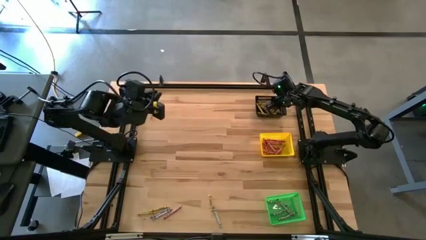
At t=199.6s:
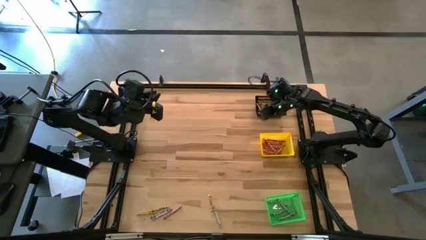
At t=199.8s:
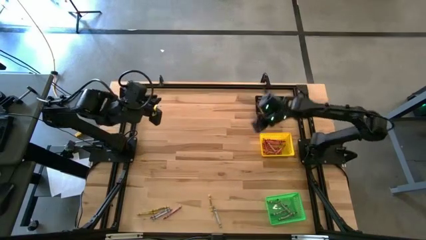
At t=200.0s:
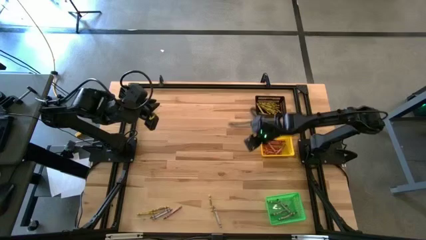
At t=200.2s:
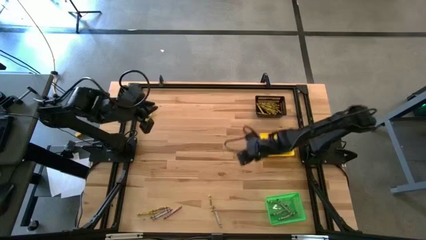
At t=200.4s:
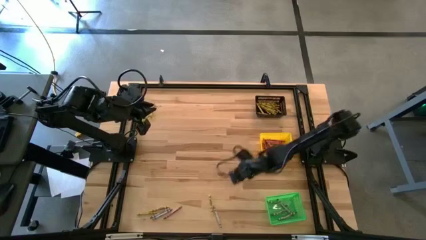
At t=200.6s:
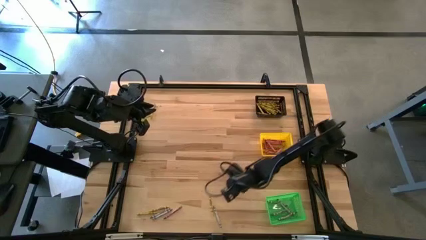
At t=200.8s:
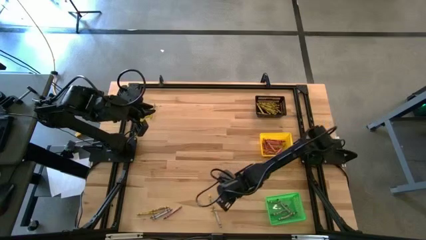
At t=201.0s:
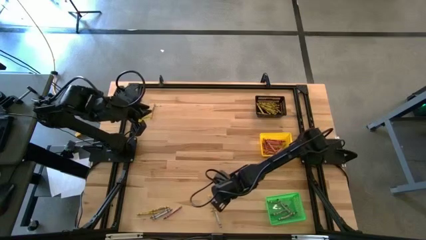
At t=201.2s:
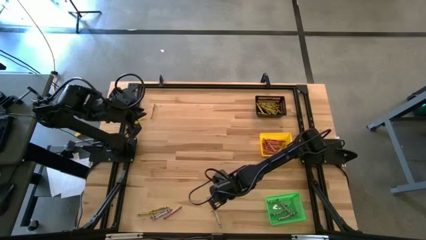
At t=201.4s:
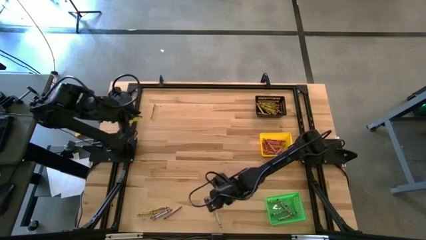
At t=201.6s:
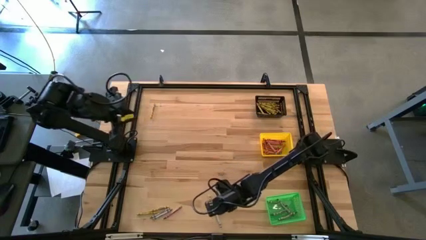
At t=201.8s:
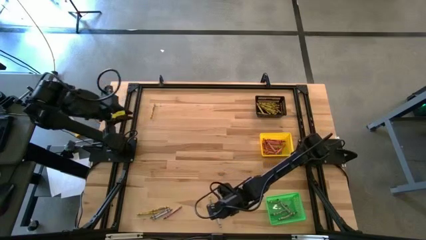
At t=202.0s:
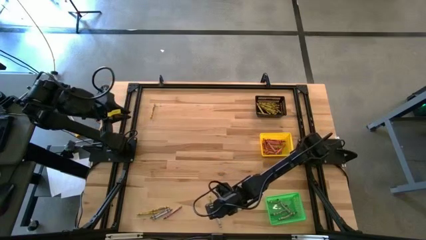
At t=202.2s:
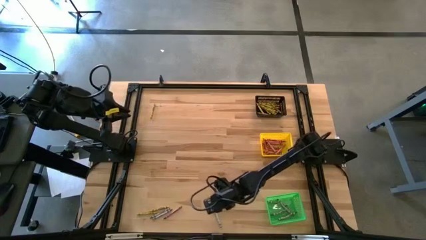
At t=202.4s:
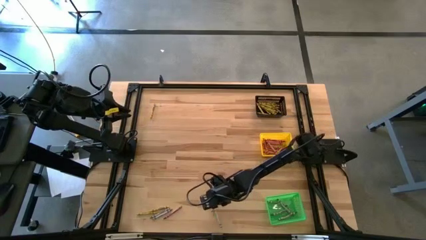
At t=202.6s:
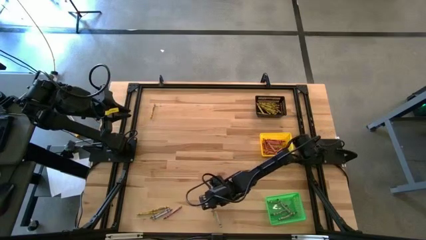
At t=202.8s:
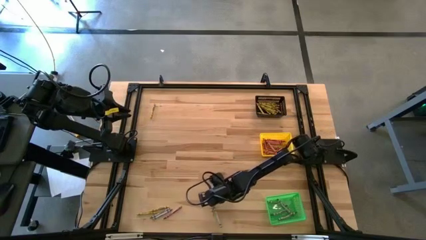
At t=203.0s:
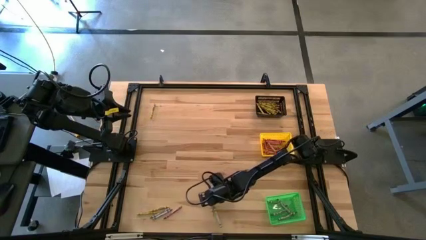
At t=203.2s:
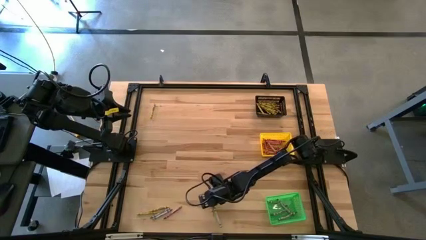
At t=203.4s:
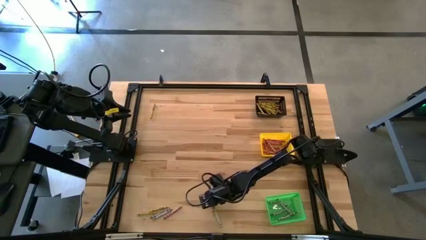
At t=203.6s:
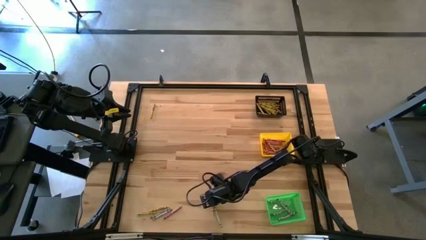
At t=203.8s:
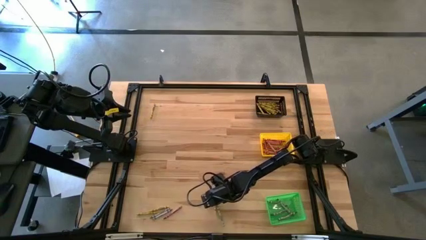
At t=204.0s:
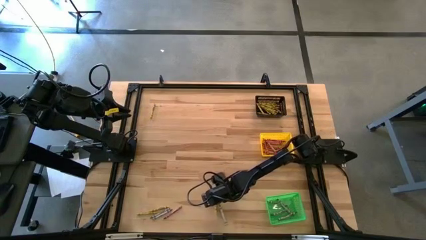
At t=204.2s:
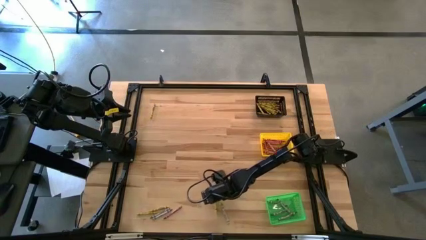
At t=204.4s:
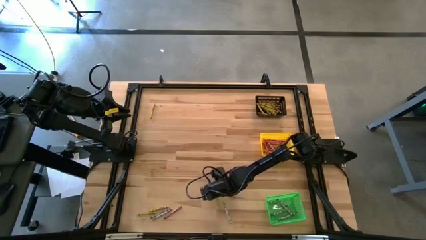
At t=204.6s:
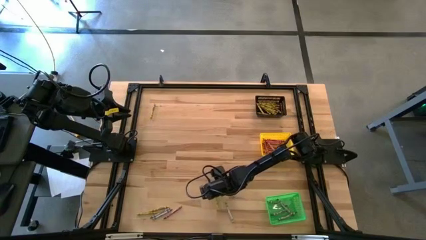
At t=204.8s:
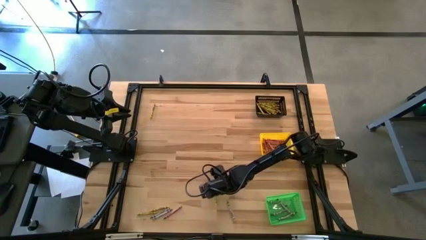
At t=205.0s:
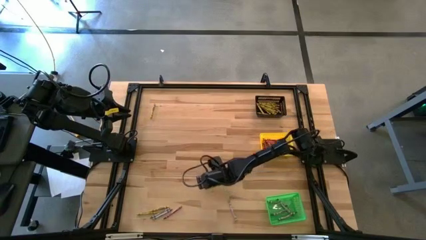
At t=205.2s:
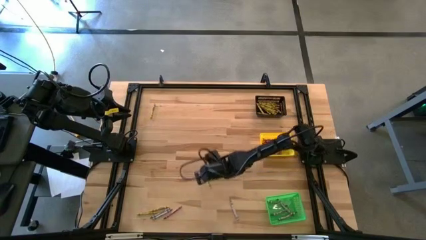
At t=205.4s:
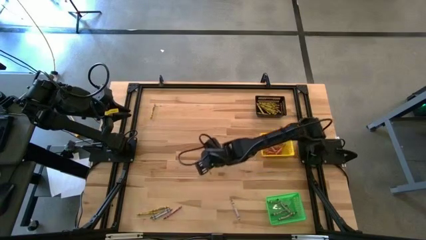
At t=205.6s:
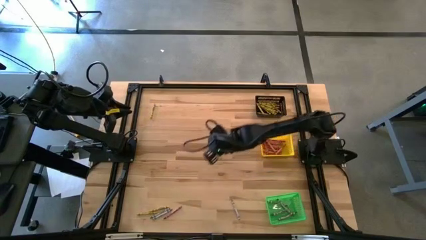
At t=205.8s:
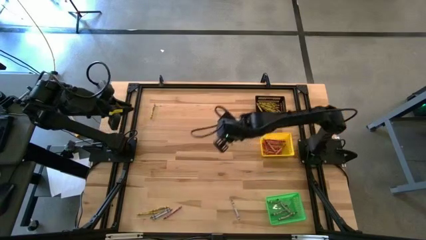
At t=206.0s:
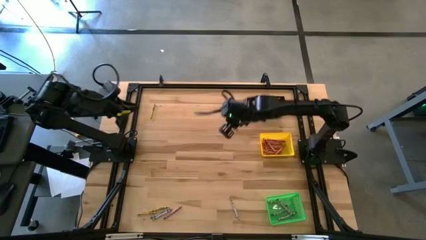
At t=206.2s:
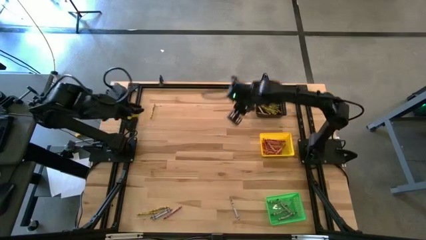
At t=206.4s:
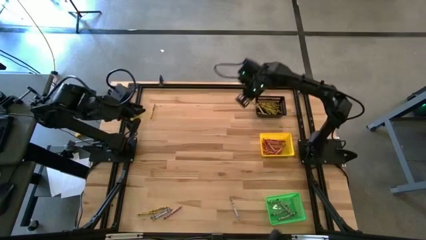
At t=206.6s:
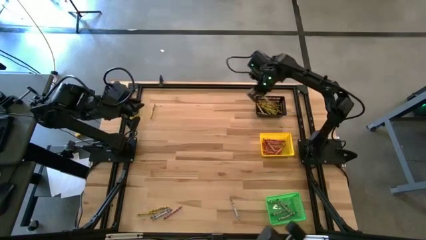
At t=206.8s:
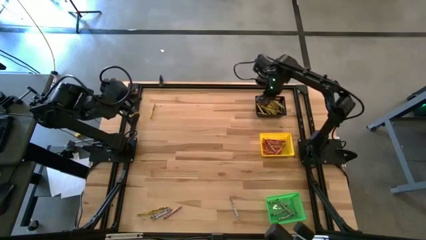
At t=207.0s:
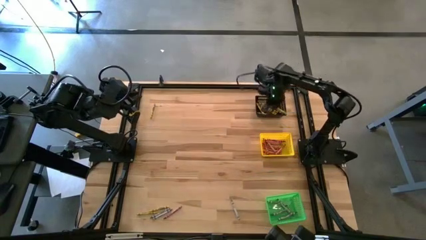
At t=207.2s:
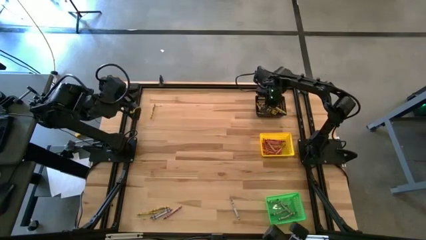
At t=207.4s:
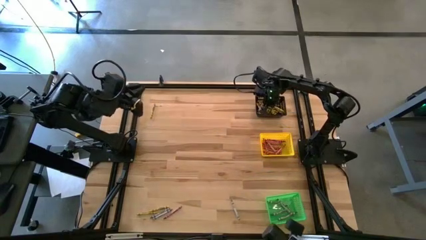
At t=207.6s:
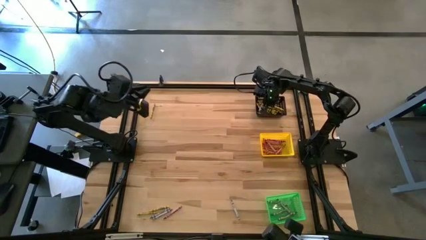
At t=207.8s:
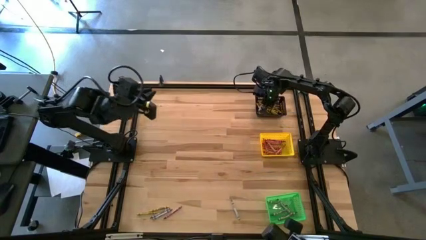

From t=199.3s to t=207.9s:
Task: Sort crayons
Put the yellow crayon into the black bin

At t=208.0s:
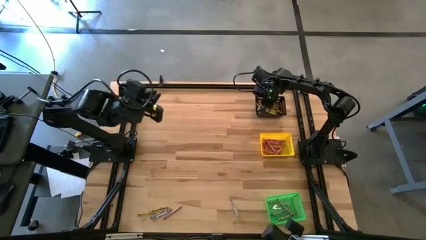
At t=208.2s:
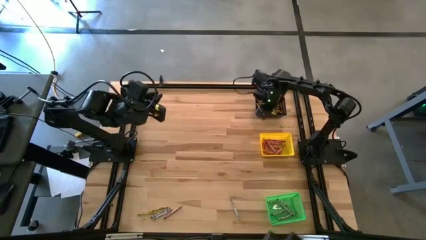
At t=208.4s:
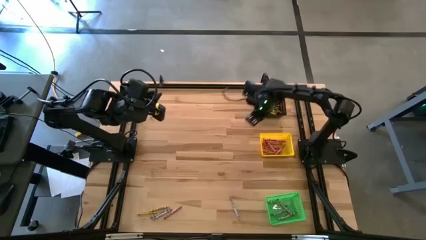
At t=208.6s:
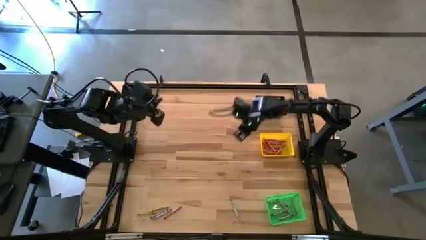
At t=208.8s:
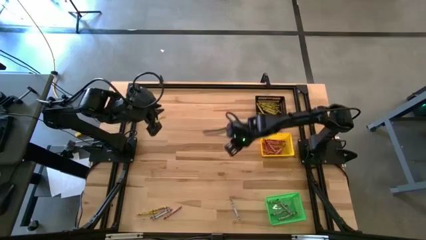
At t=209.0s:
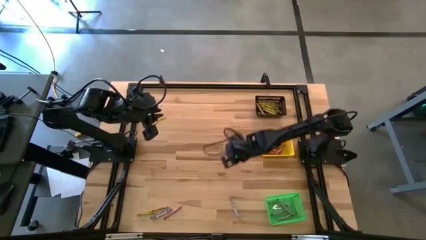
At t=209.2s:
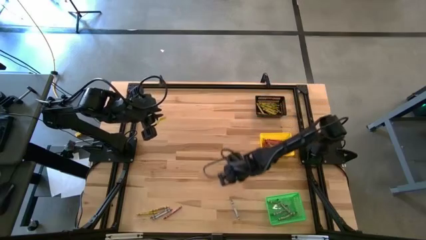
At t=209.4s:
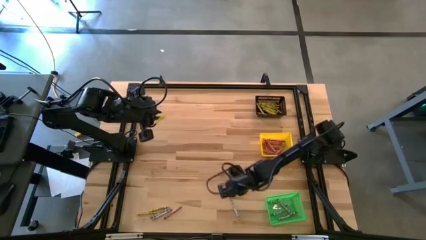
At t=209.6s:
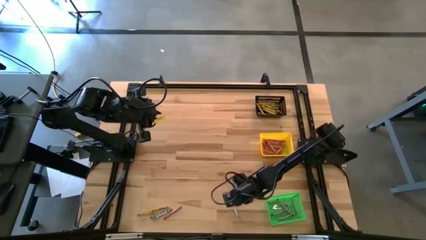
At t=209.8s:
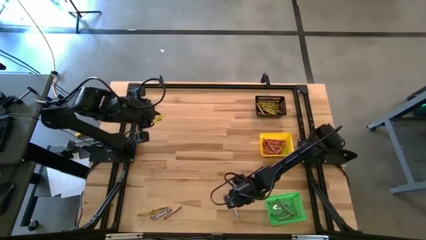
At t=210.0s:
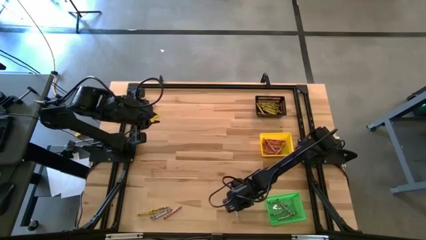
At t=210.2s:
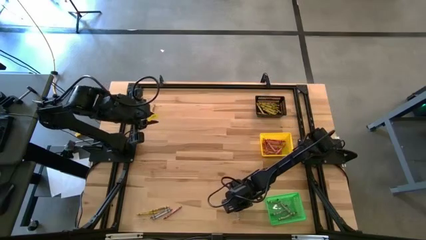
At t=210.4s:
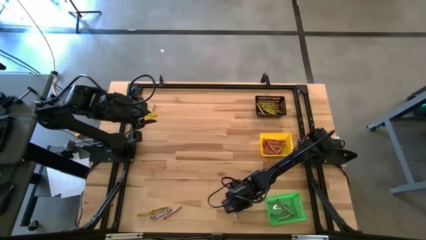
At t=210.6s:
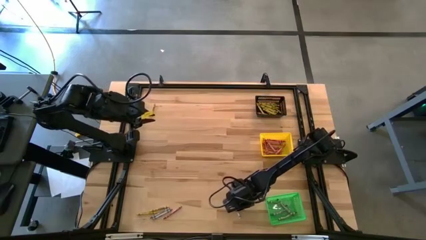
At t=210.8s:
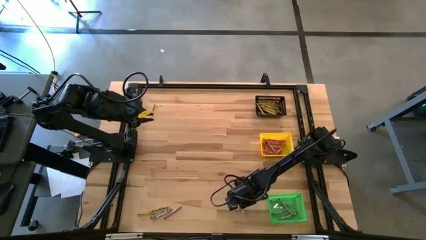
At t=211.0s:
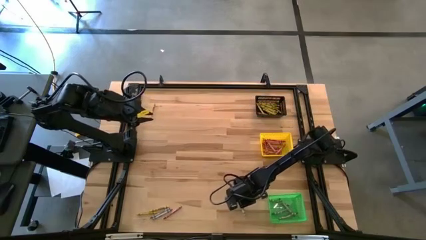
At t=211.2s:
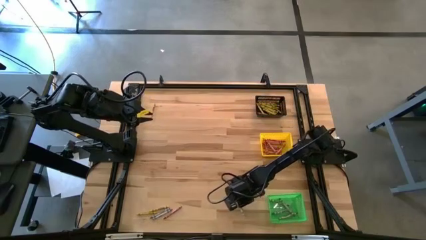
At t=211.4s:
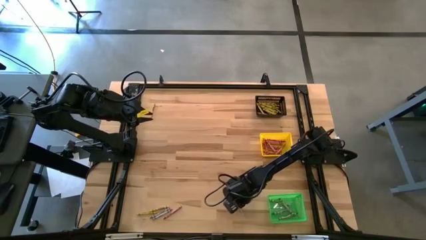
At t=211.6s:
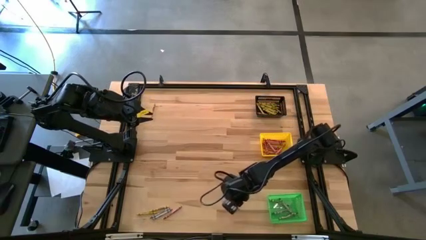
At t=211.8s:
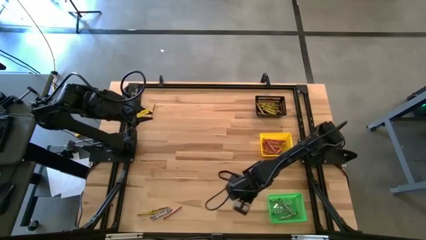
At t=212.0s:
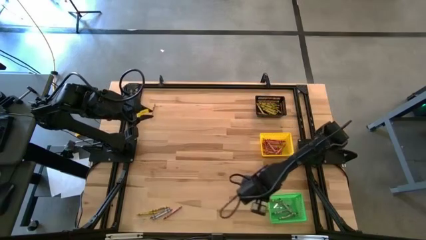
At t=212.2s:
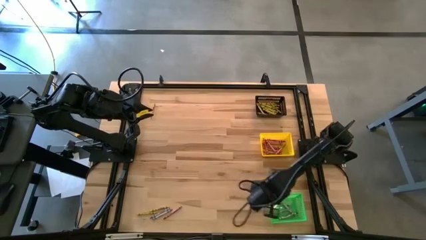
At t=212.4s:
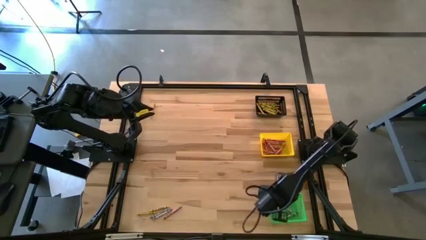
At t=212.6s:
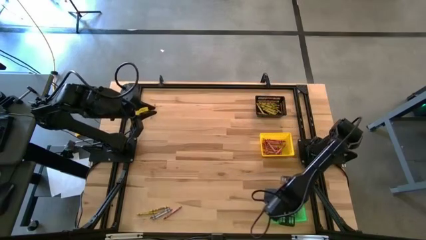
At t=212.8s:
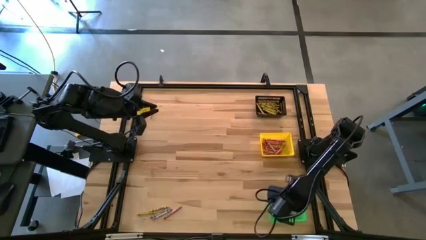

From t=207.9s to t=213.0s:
Put the gray crayon into the green bin

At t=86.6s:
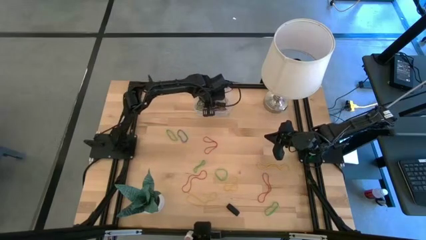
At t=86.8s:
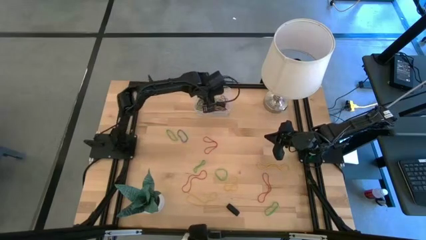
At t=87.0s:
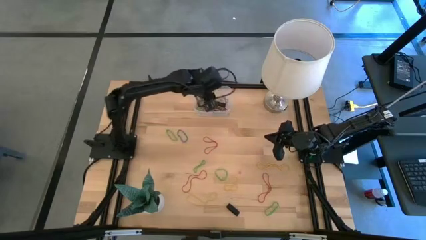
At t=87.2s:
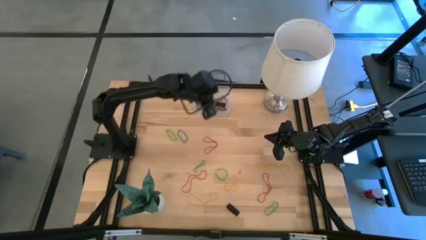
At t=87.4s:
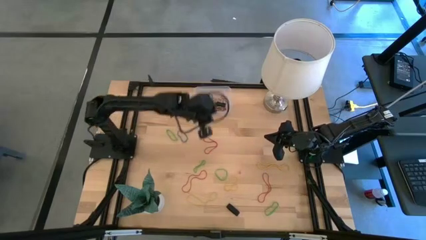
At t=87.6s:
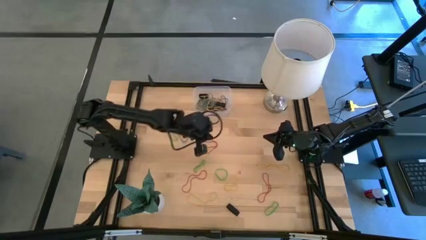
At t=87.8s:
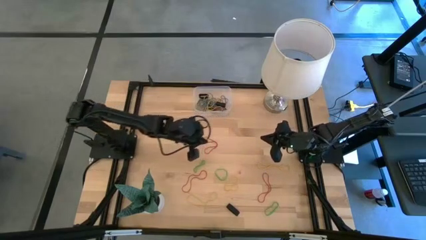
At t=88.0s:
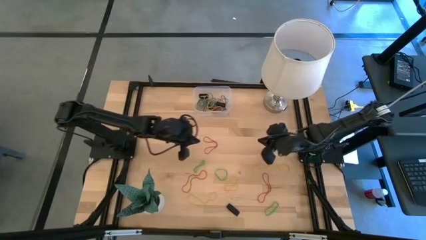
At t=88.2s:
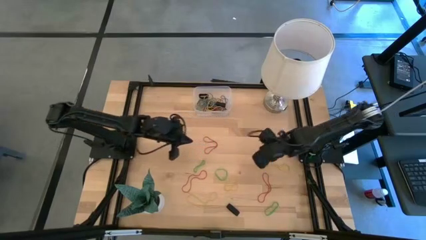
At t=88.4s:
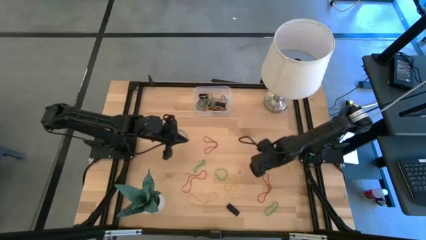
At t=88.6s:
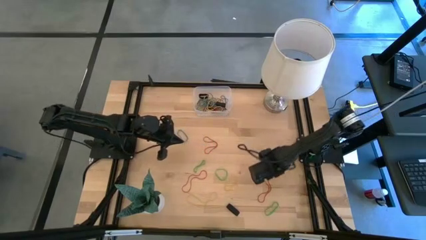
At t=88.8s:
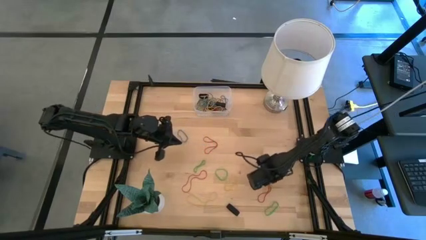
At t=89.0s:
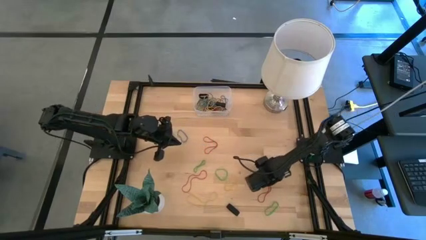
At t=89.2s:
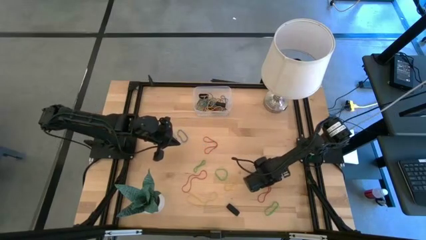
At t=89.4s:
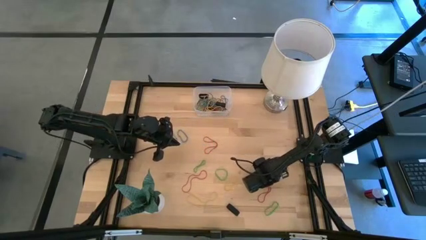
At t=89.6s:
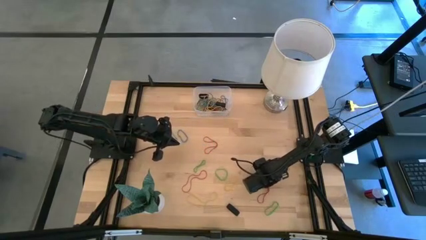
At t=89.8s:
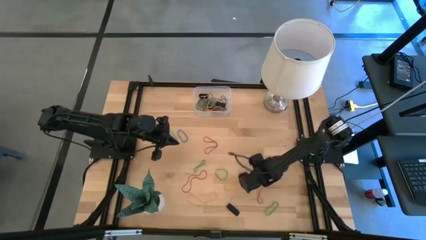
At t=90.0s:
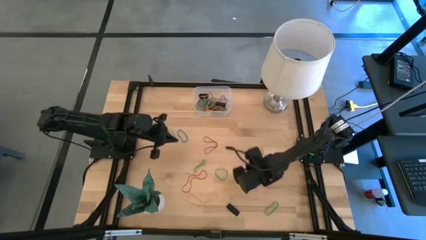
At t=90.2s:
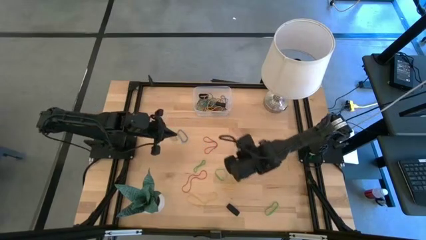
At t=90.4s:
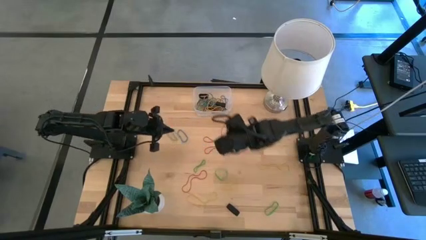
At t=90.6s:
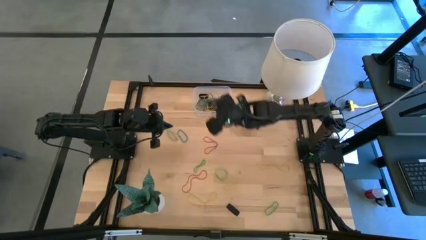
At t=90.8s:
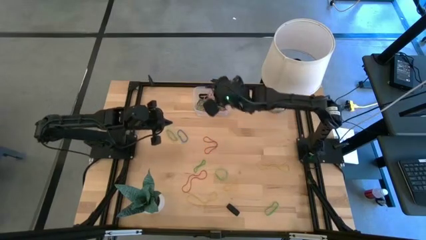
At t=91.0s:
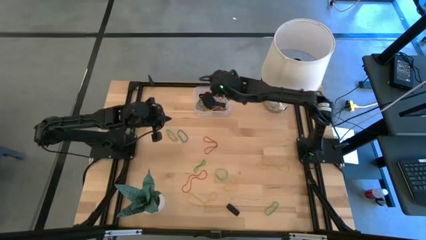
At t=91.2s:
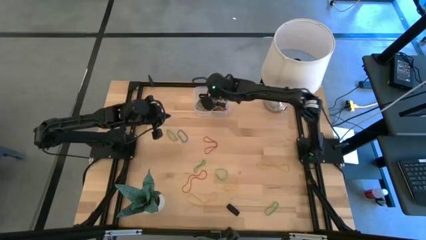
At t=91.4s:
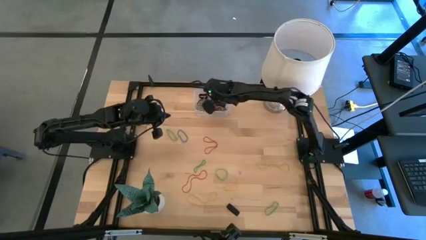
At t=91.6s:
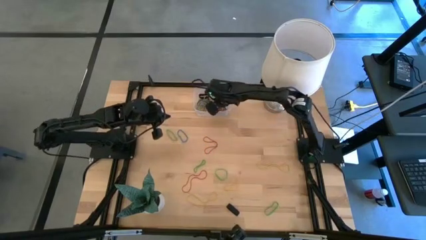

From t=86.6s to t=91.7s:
Task: Pick and place rubber bands into bin
Put the red rubber band into the transparent bin
